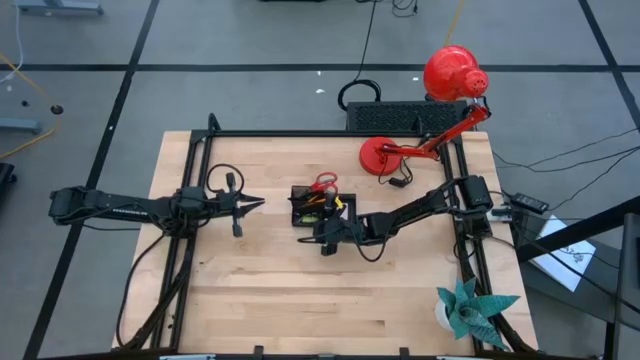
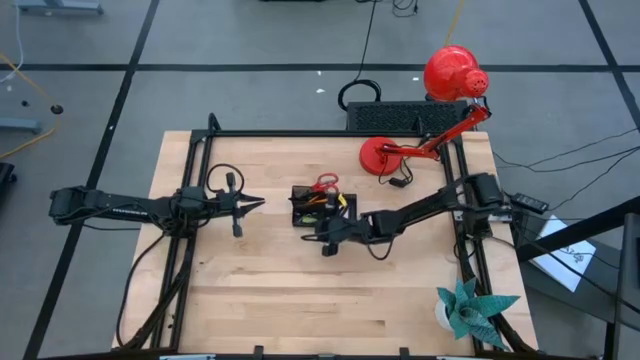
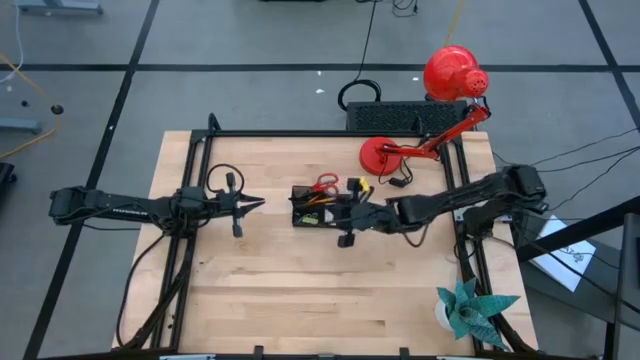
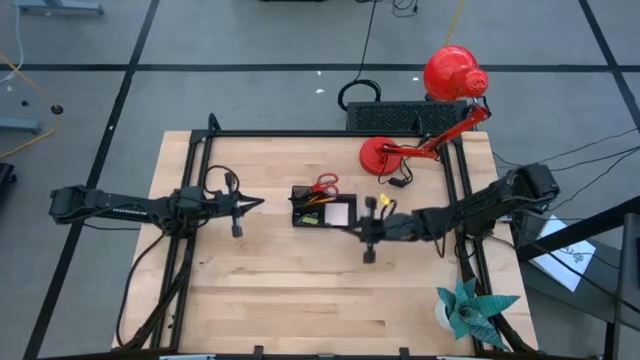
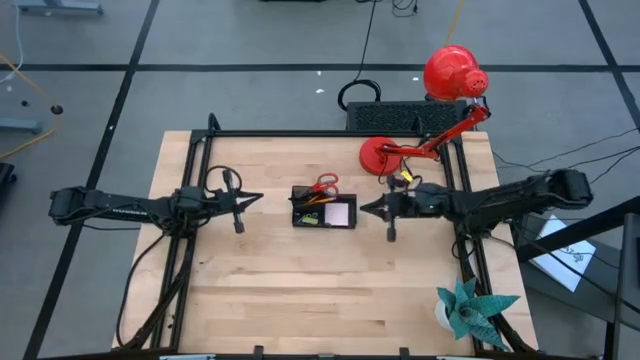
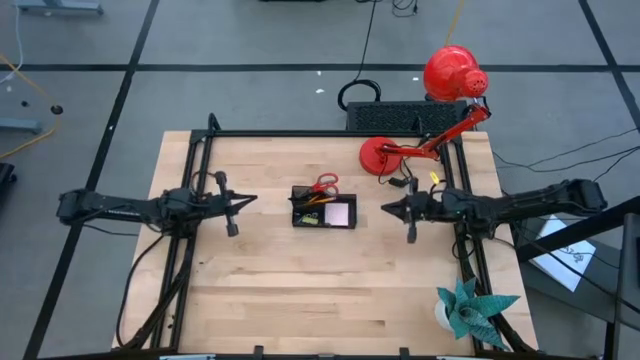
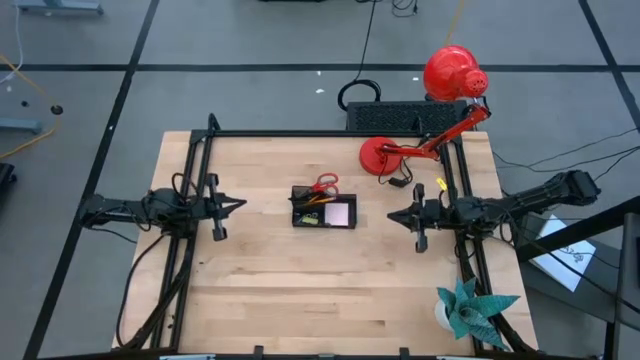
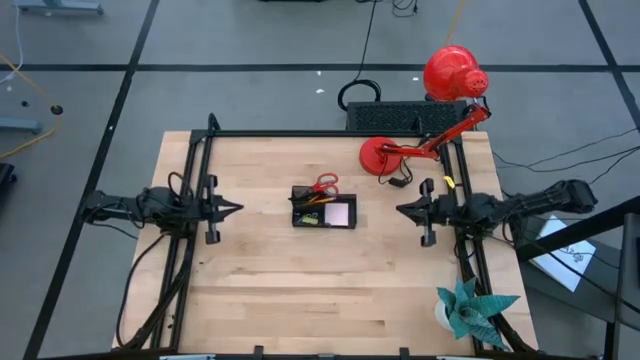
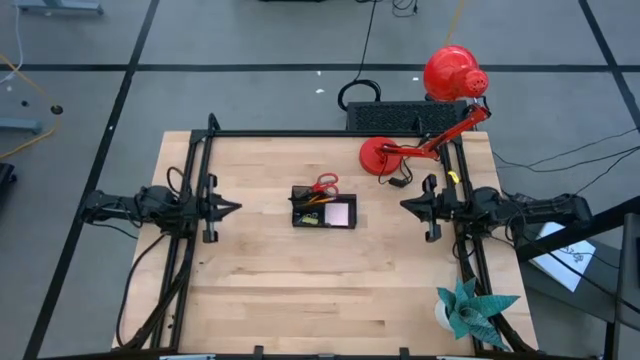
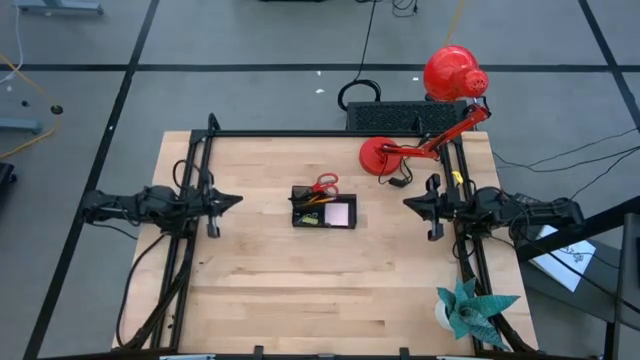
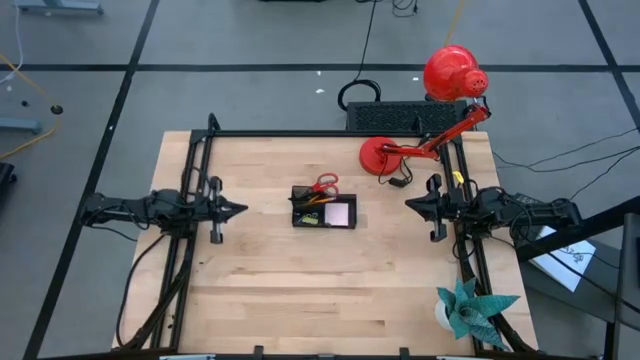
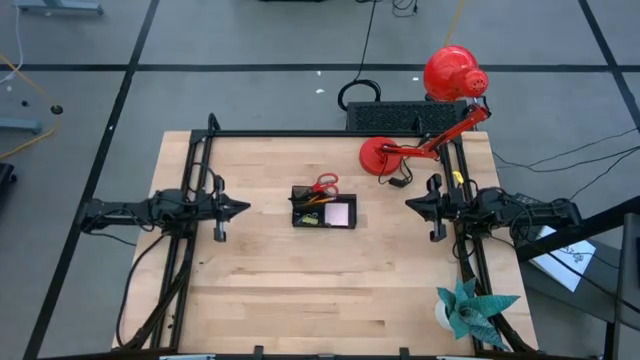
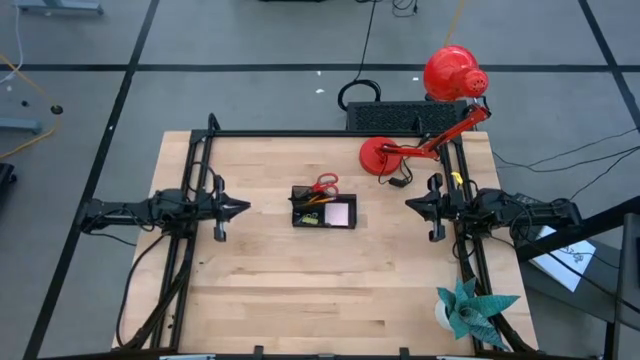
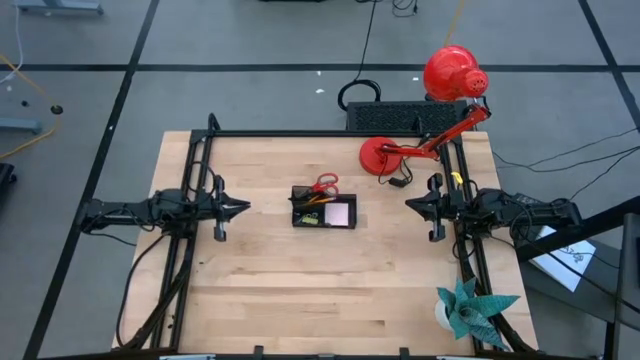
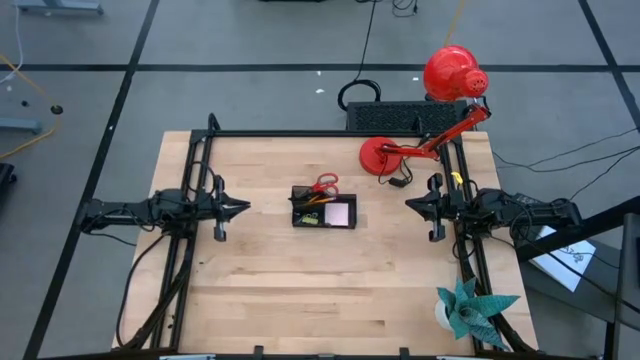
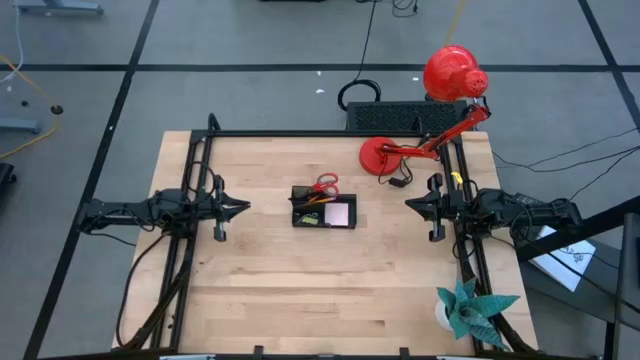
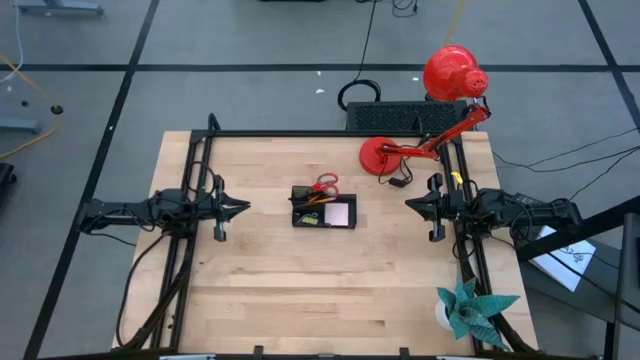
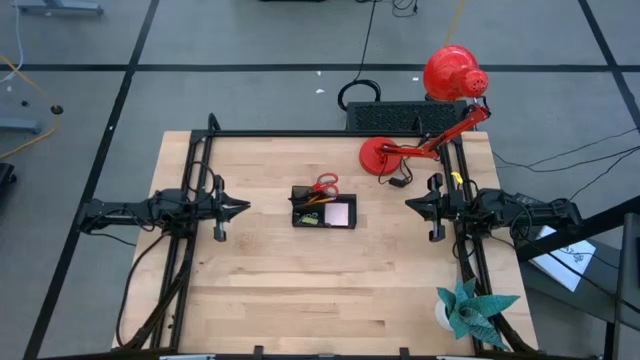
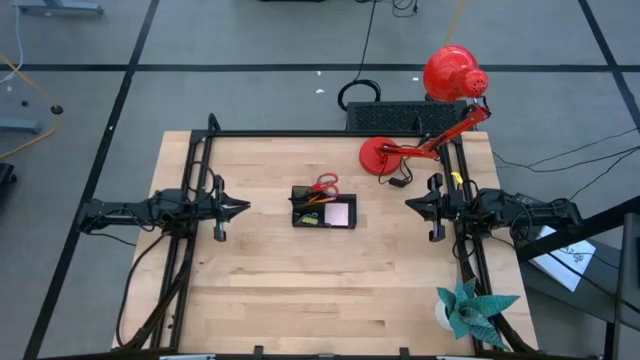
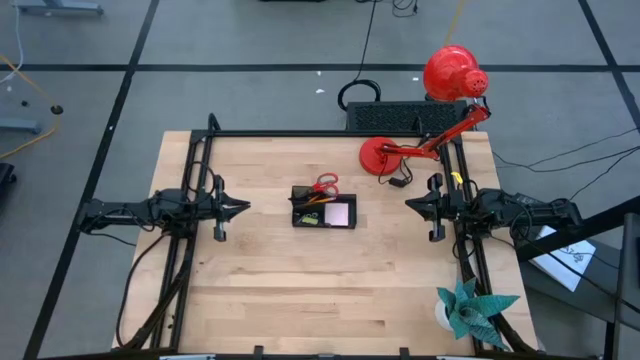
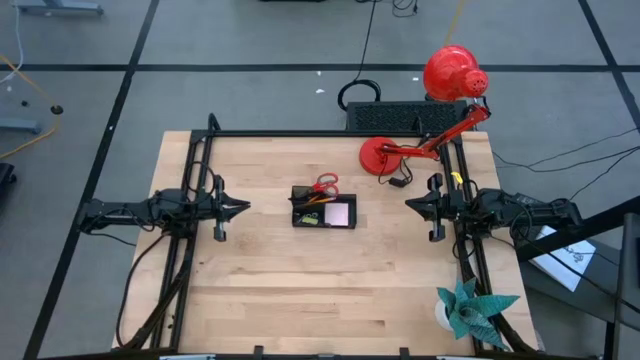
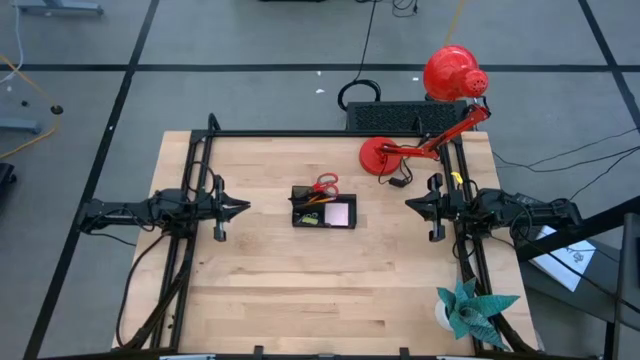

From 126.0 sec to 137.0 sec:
Task: Pick and place office supplies into organizer
Return to Home Position

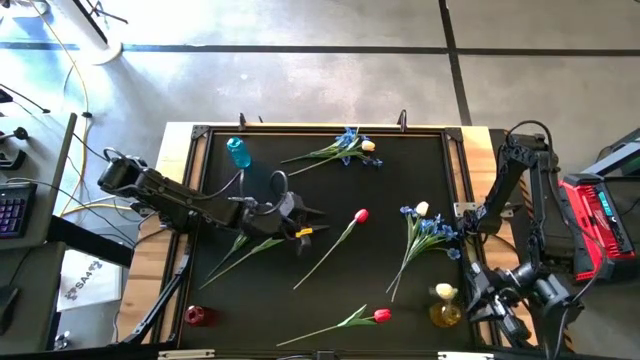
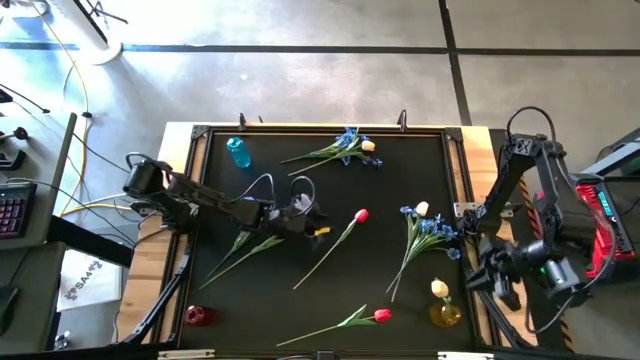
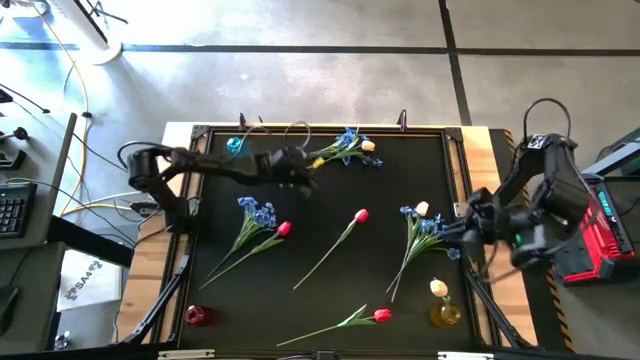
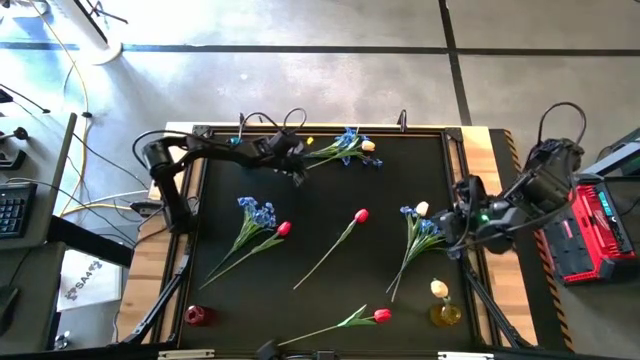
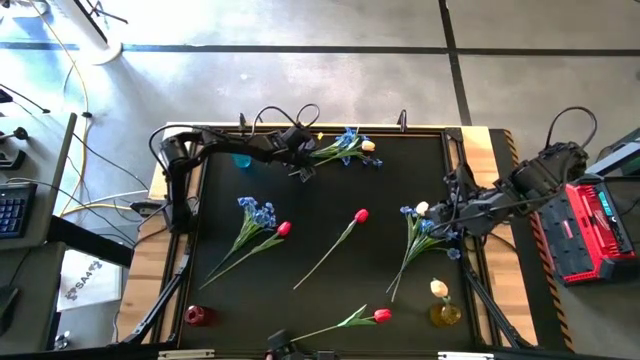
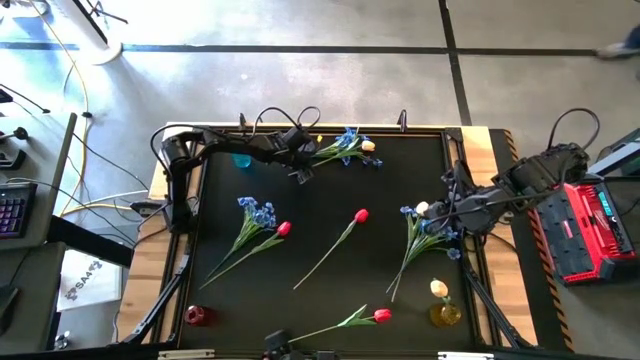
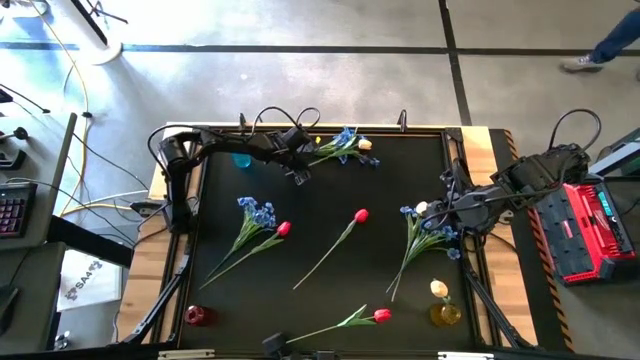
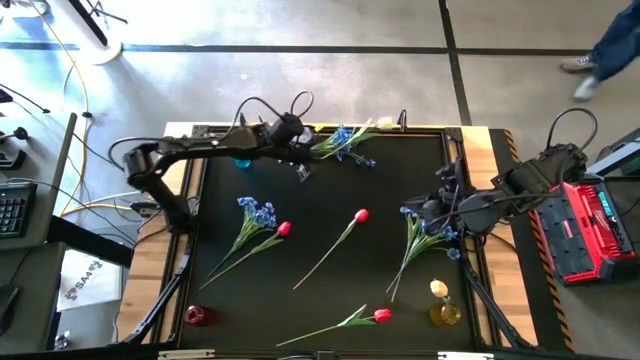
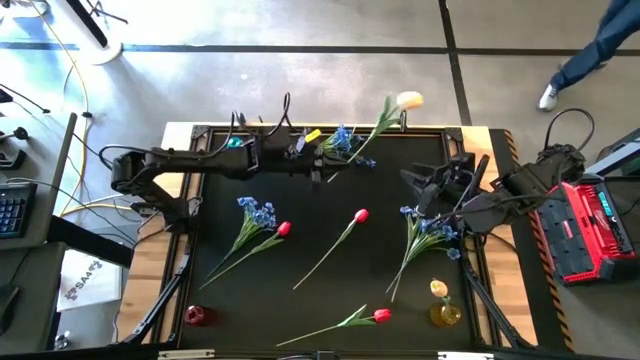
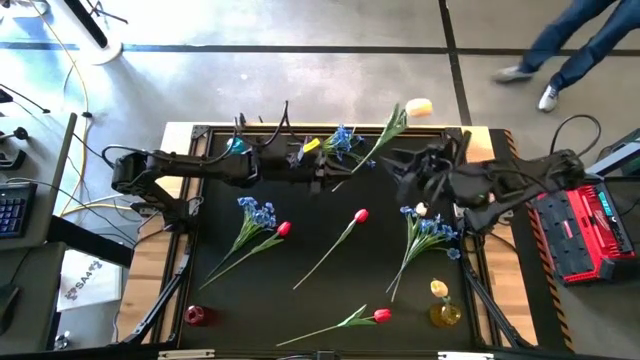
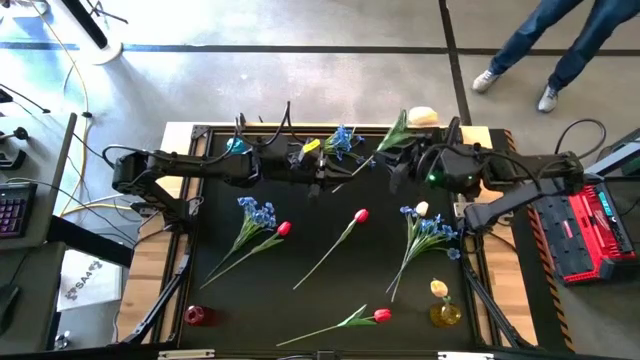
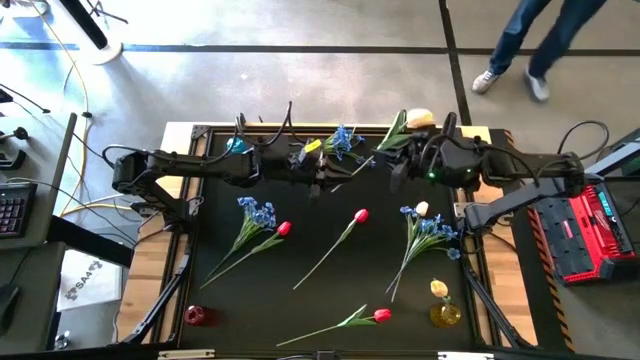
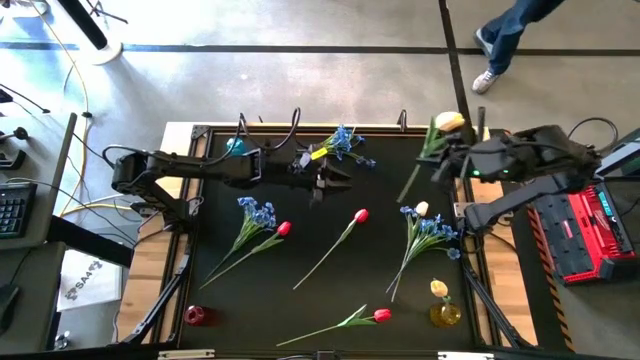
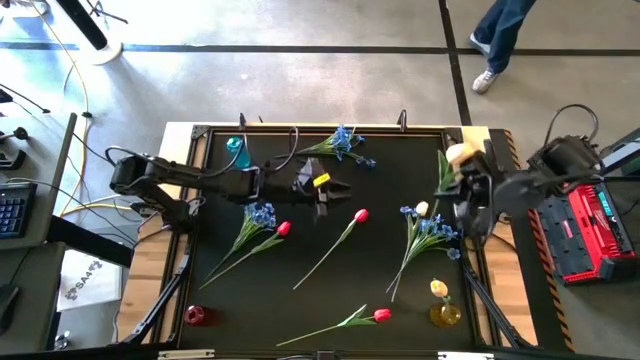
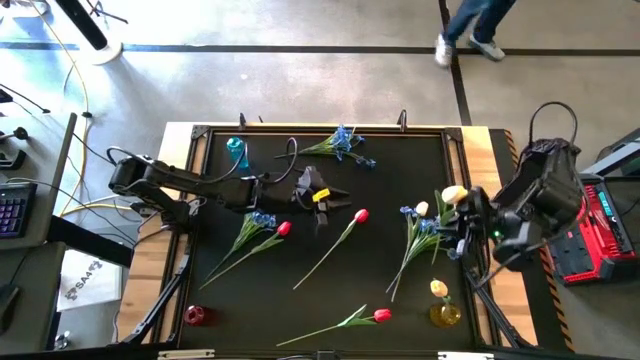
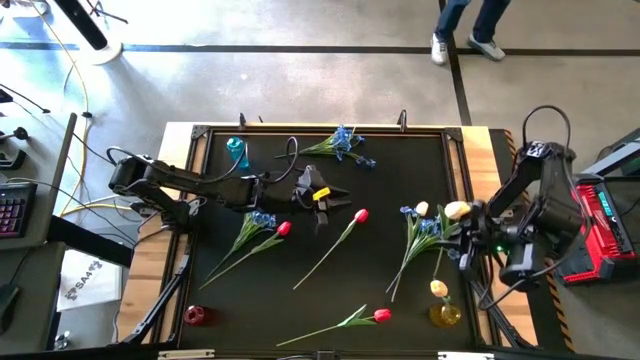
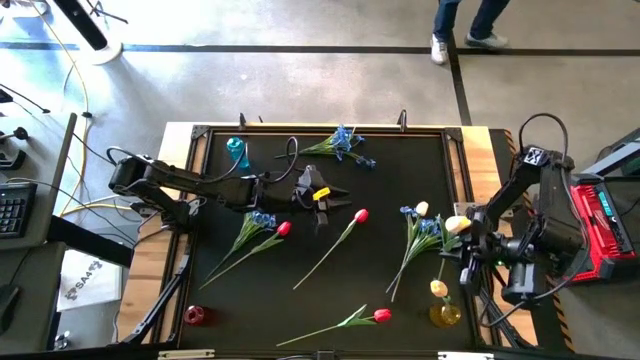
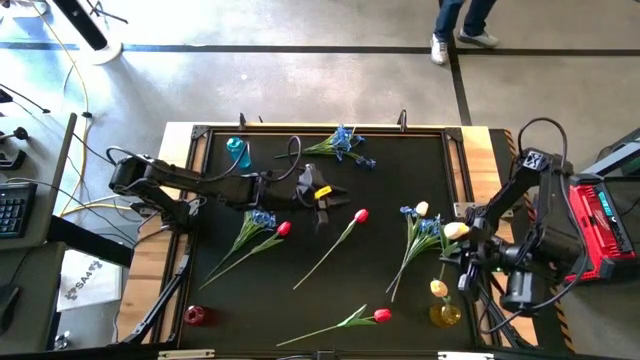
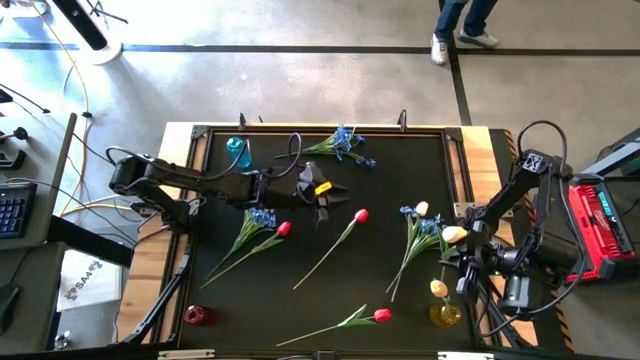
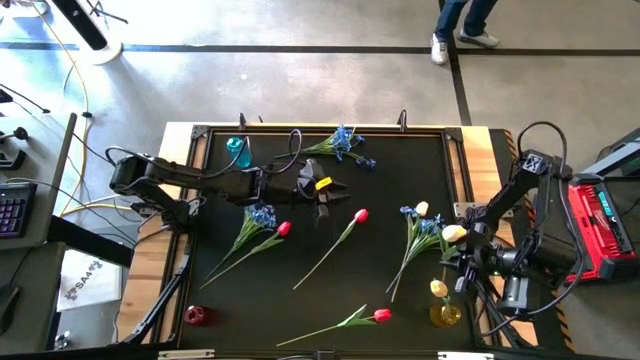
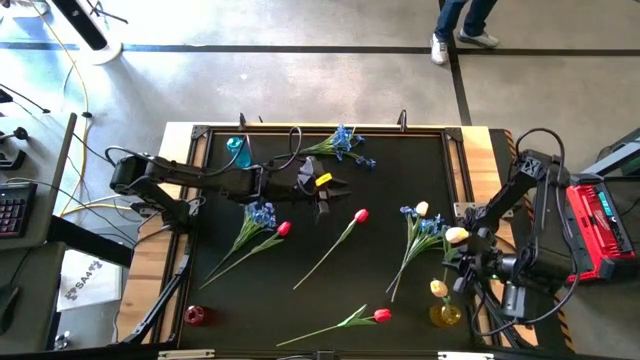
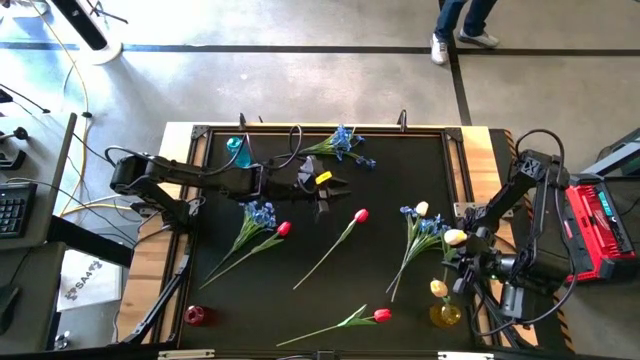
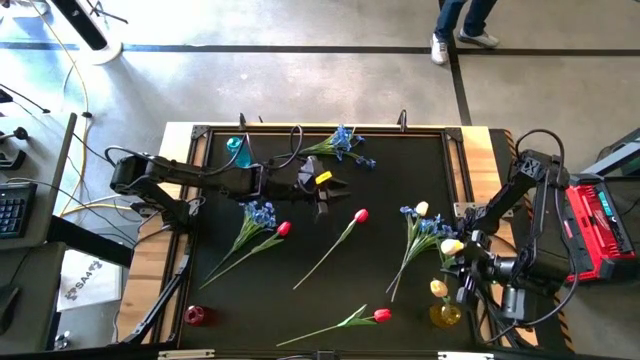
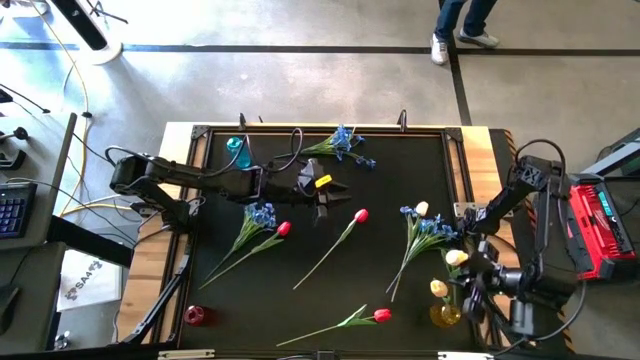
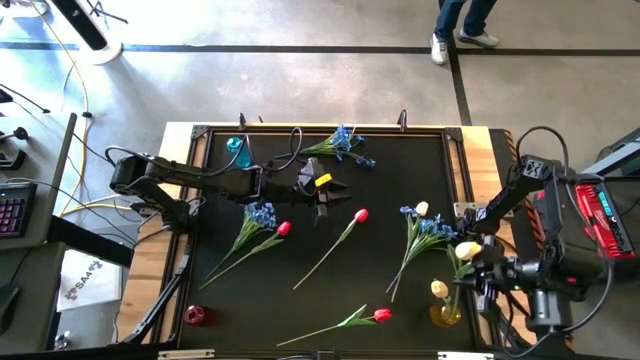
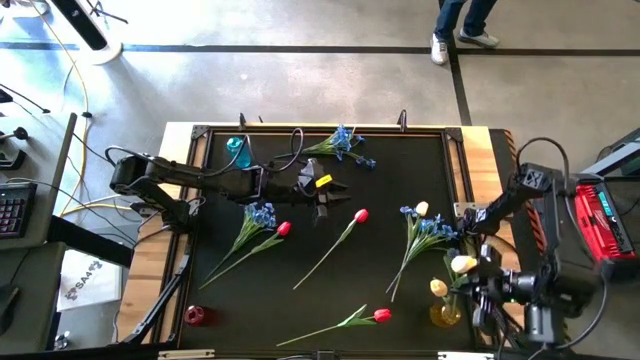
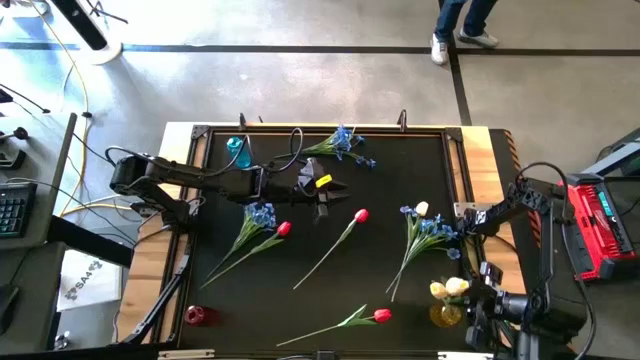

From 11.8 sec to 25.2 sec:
Task: Sort flowers into vase by color
Put the top light yellow tulip into the yellow vase
